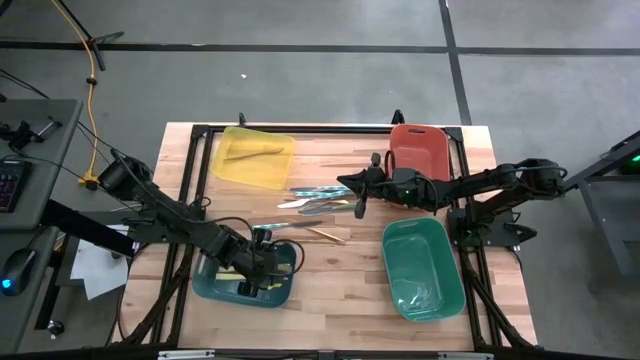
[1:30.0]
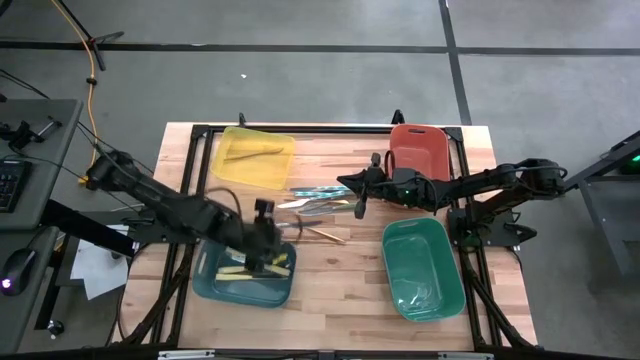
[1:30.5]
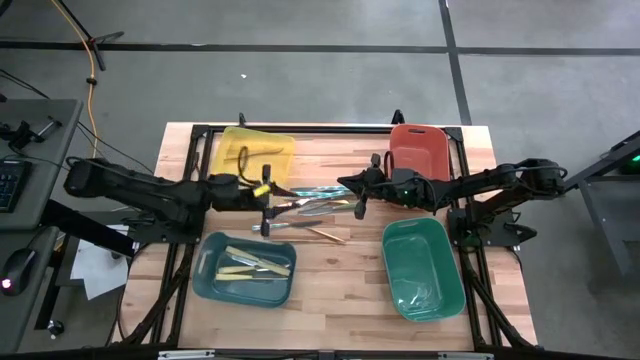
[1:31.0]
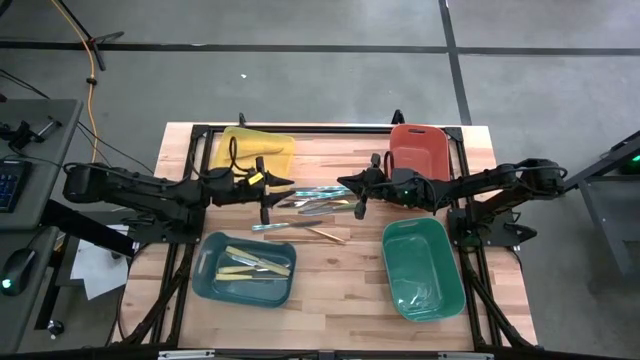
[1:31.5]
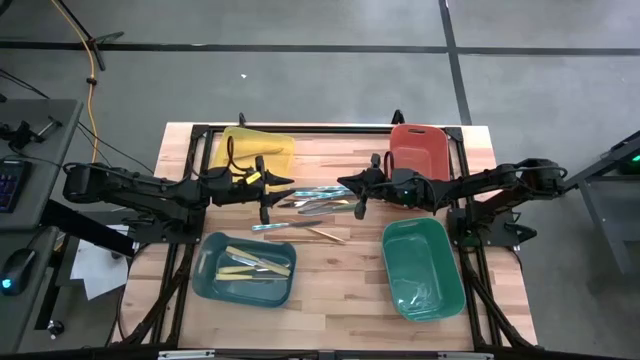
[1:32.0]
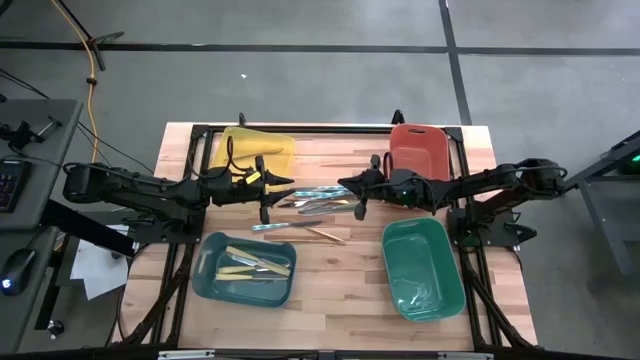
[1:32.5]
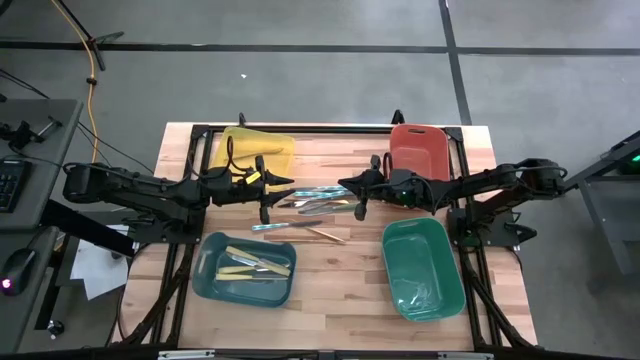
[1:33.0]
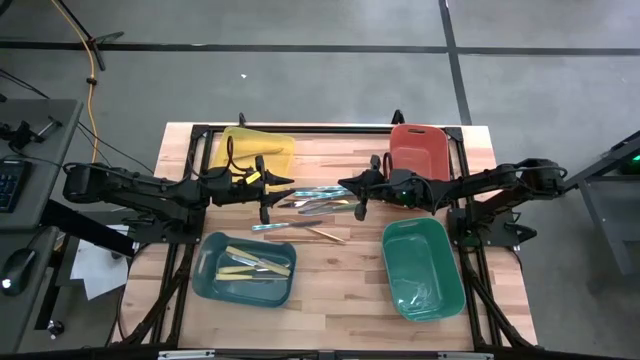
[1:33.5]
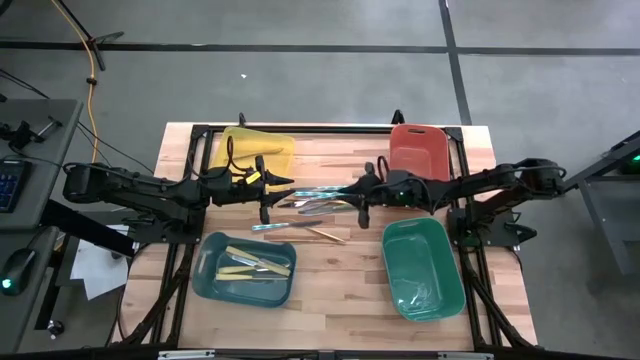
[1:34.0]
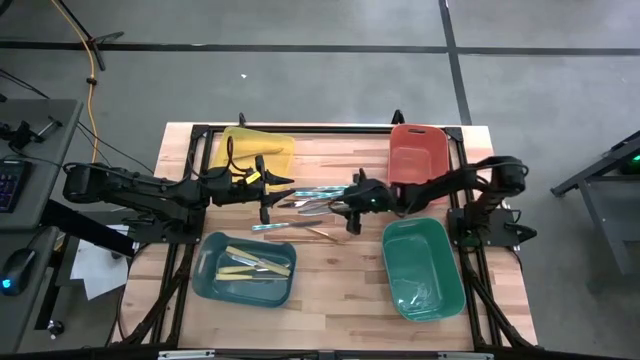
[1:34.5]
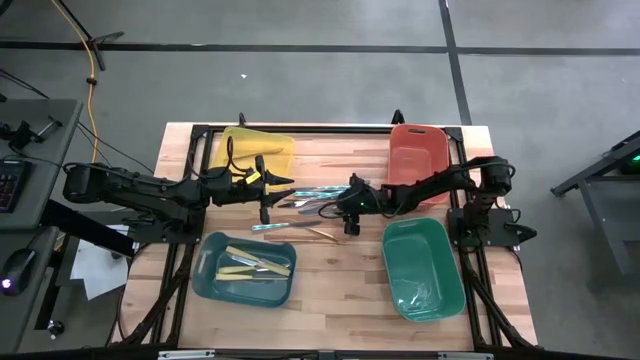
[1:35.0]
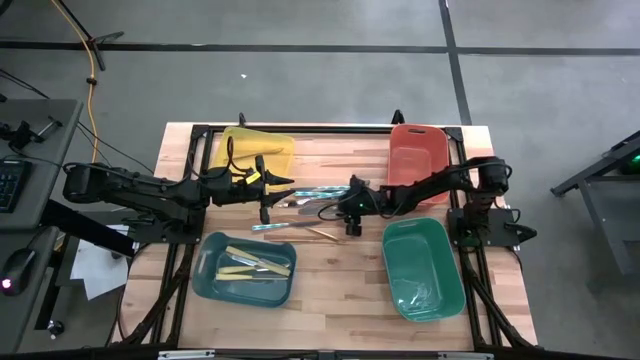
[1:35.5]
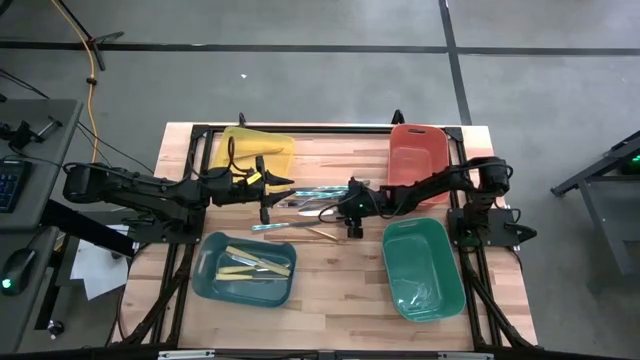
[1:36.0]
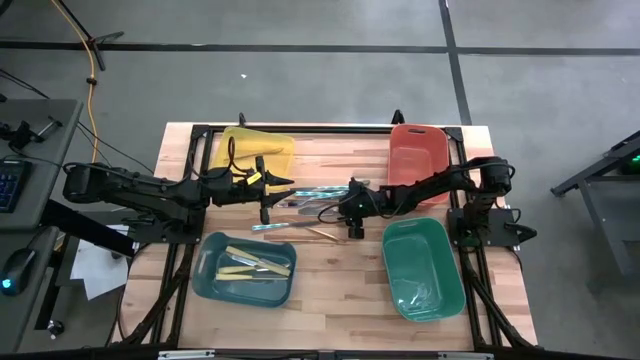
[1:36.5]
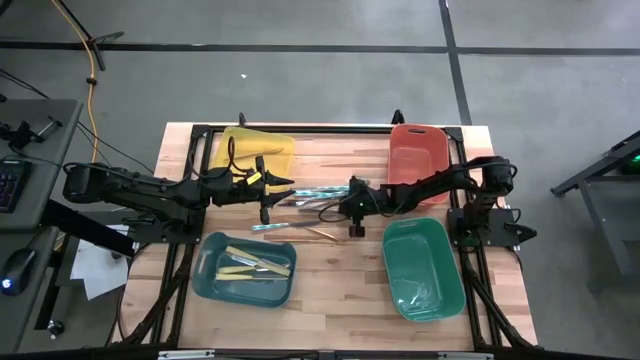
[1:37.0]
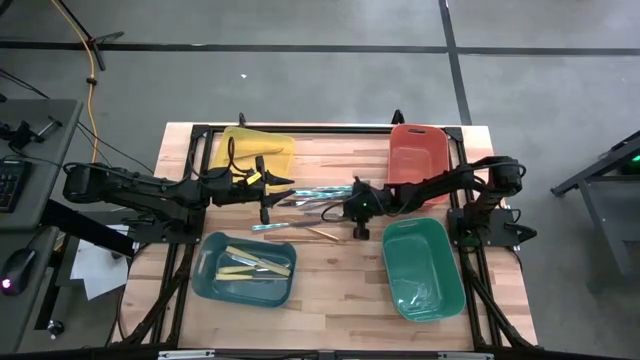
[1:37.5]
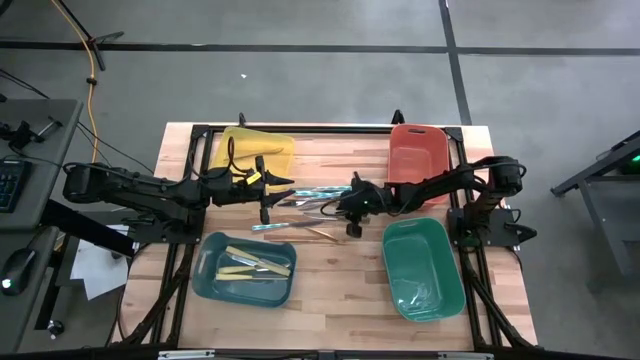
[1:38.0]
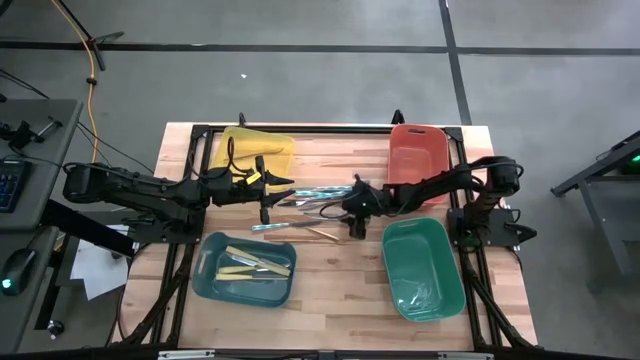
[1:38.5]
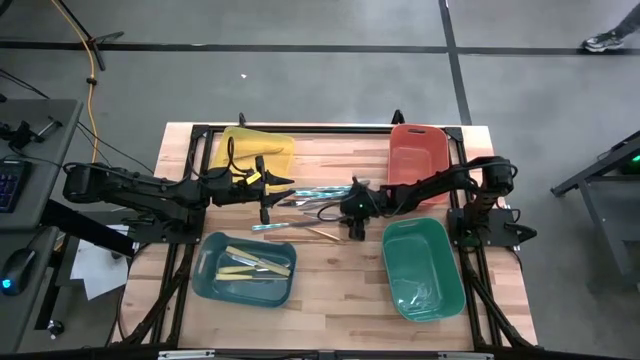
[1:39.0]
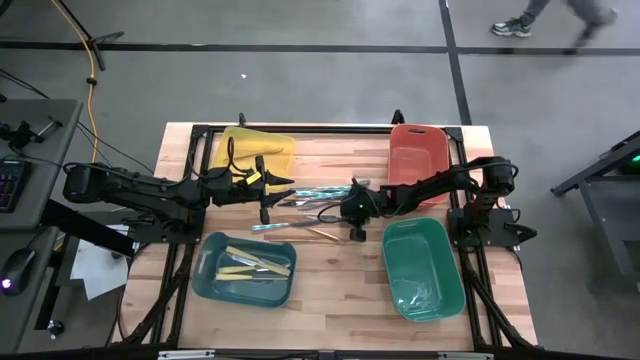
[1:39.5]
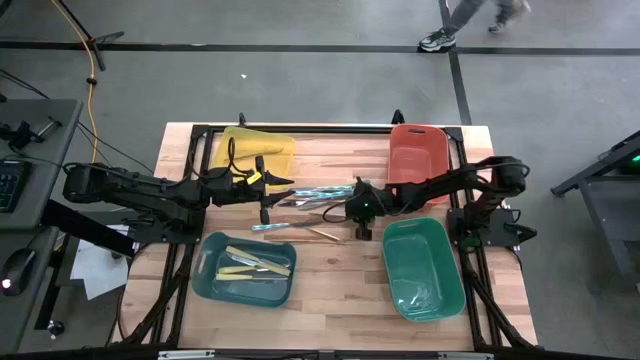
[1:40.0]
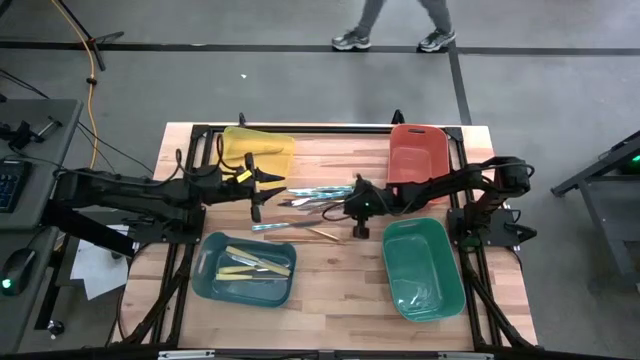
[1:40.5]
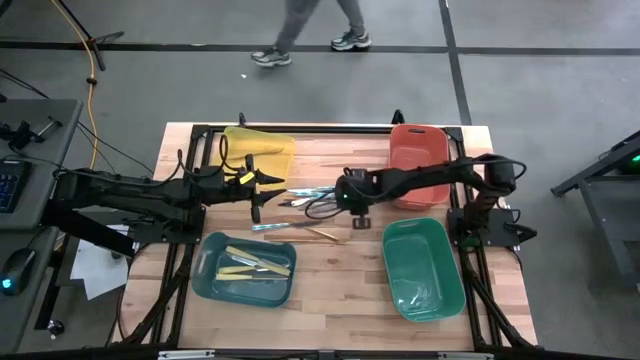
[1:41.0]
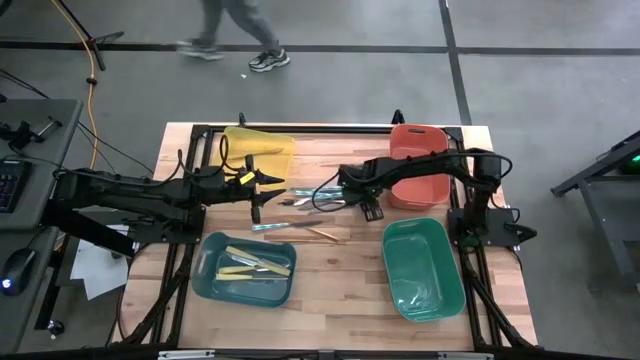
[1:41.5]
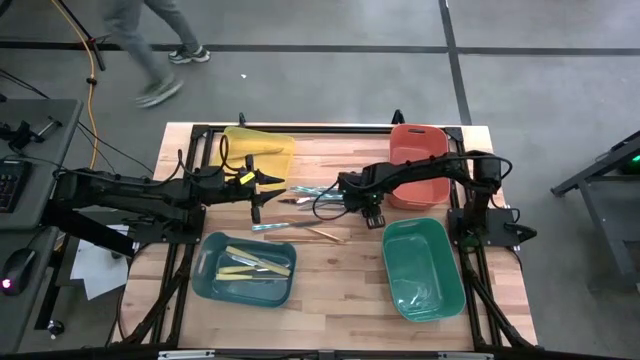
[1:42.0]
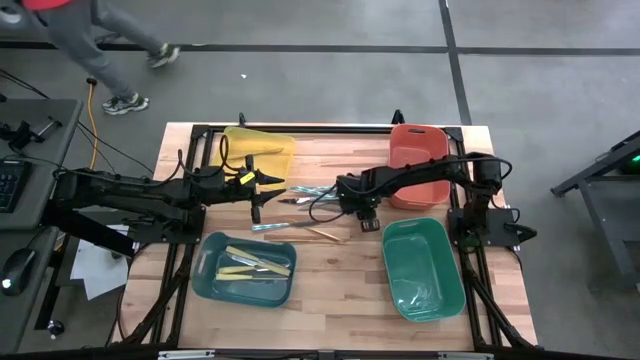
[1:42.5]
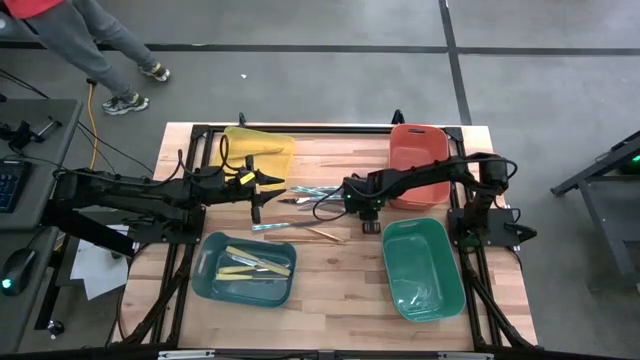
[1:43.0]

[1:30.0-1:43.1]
Task: Sort silverware by color (type)
Put the green knife into the orange bin

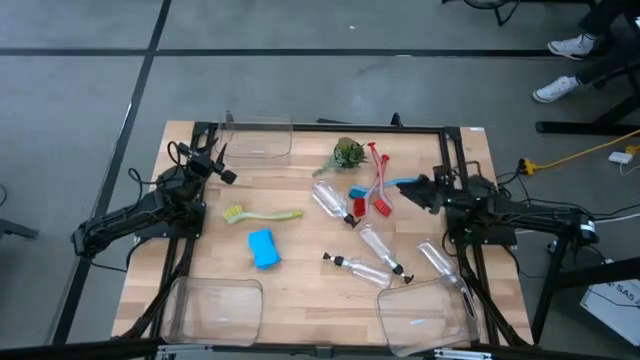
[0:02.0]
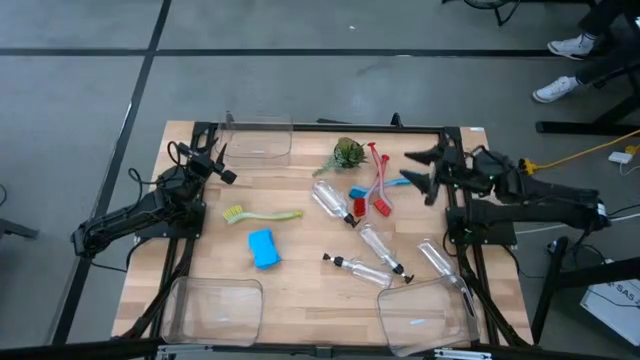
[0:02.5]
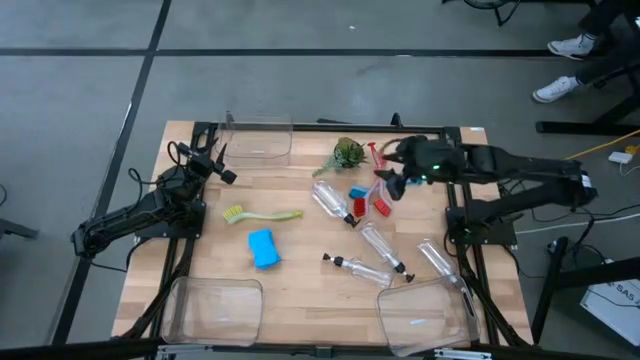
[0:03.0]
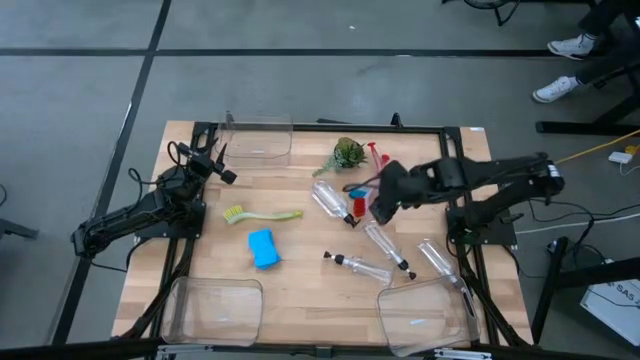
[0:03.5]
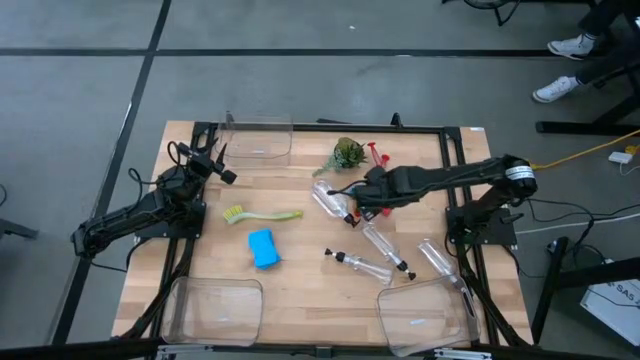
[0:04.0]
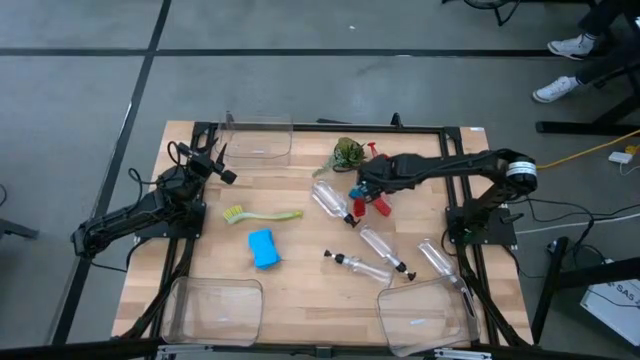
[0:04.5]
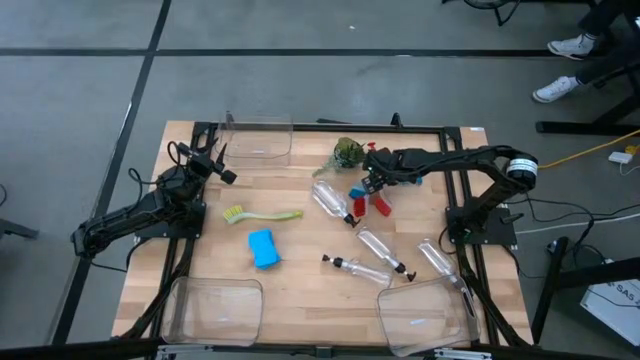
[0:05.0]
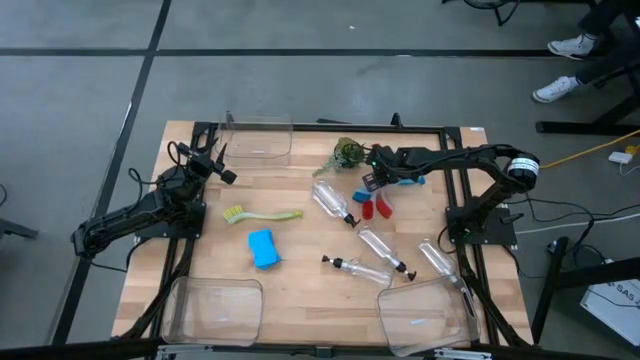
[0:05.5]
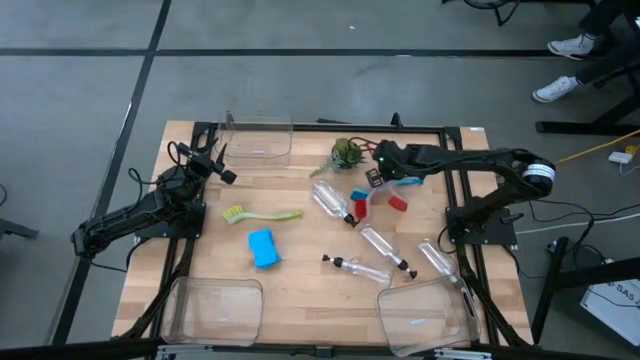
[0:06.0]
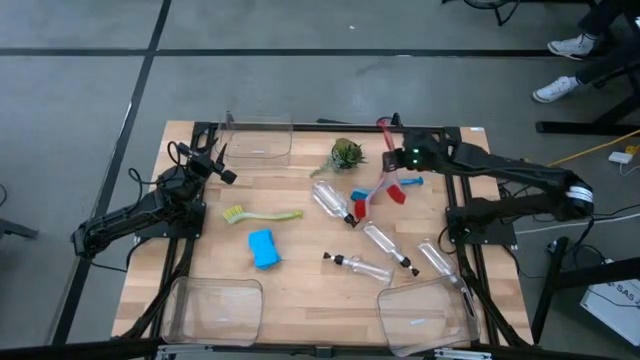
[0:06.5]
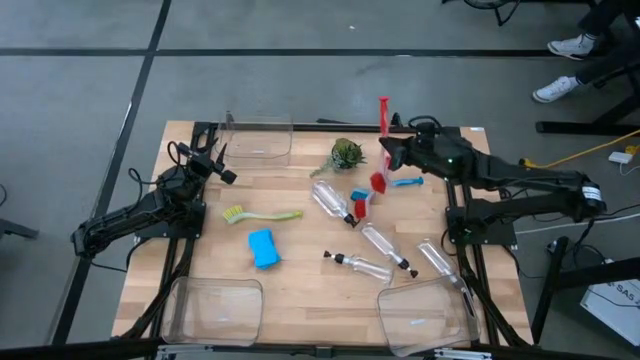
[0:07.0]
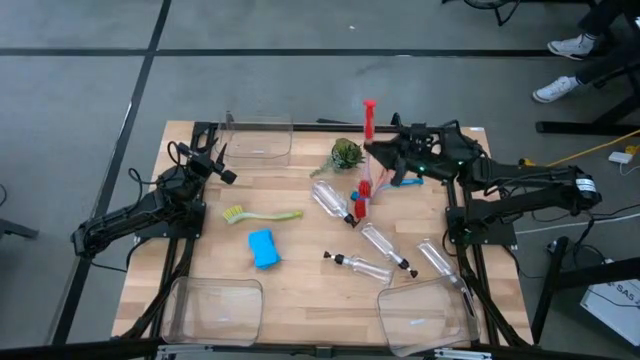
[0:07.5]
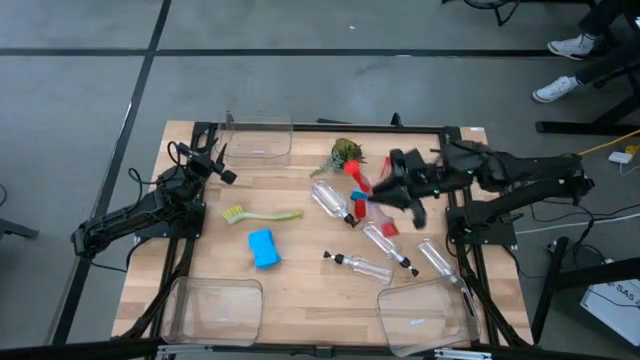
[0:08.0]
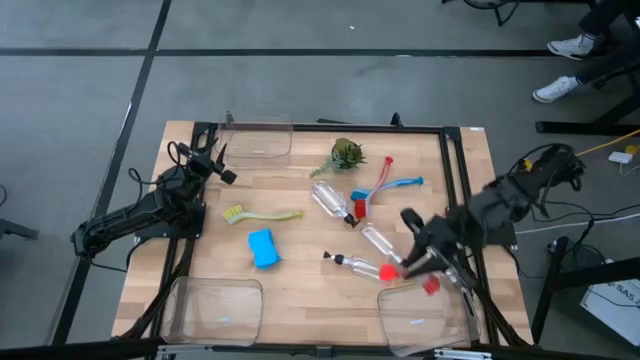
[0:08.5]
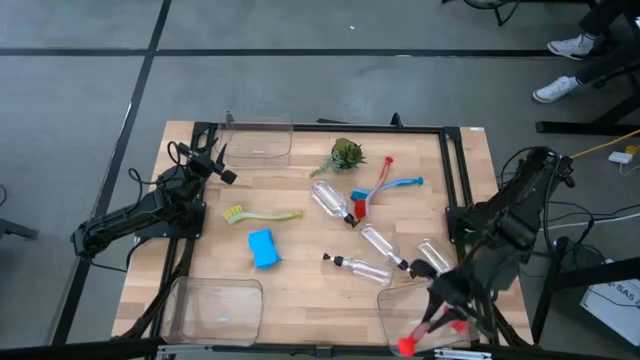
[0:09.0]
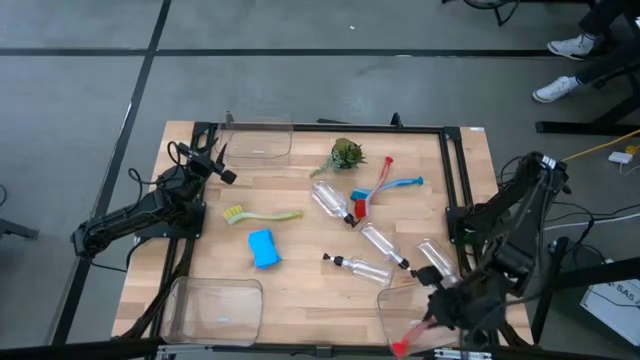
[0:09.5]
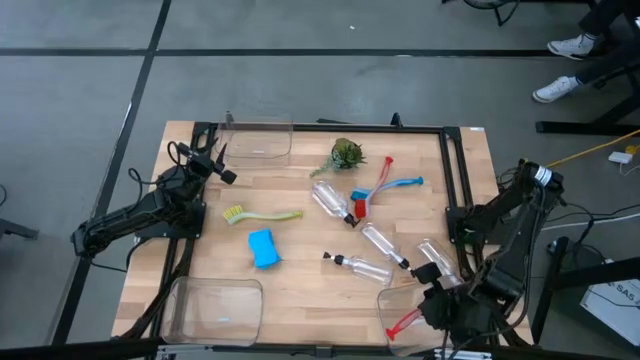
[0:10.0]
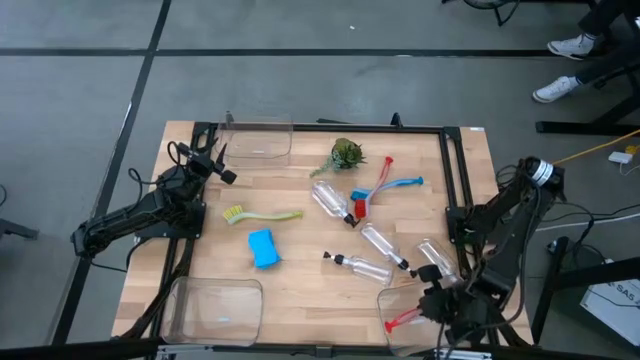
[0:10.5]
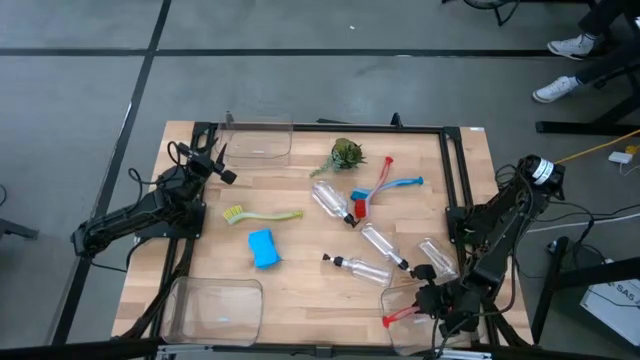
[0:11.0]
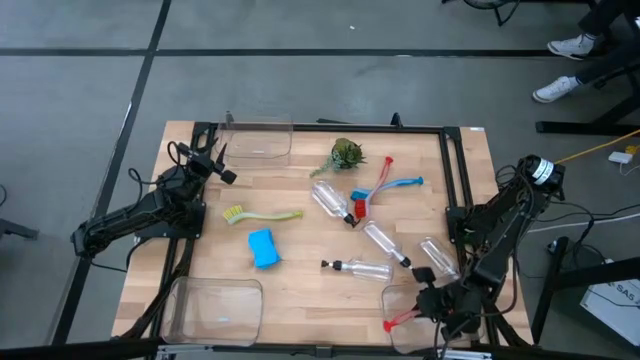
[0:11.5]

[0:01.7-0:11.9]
Task: Pick & Place Kitchen Sink Supplies
Put the red dish brush into the bottom right transparent bin
